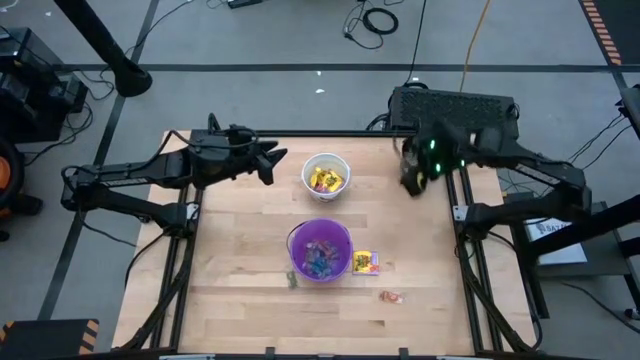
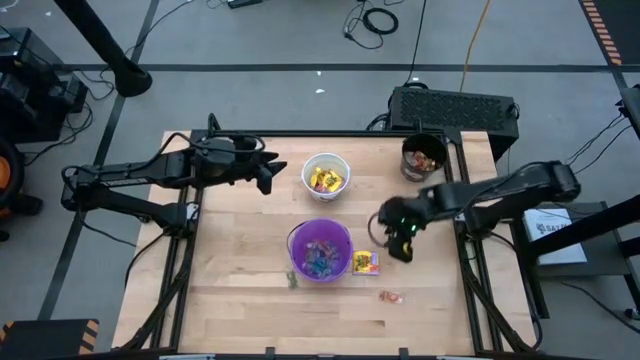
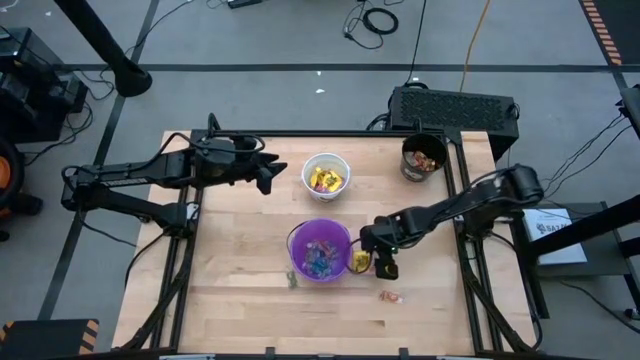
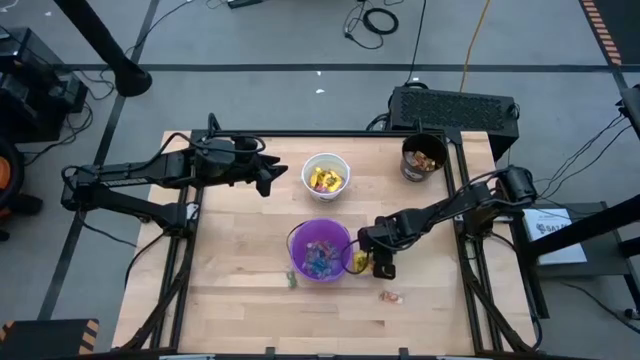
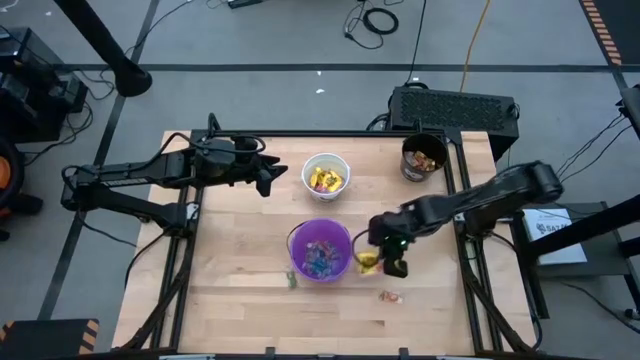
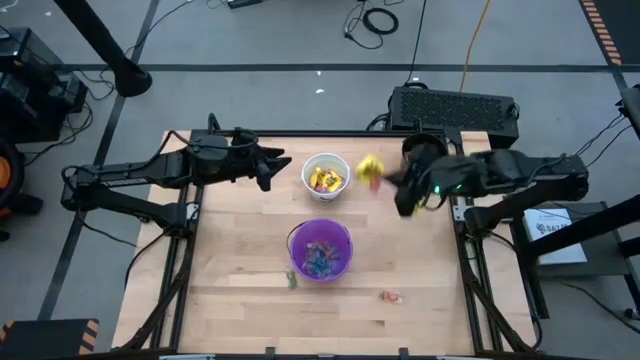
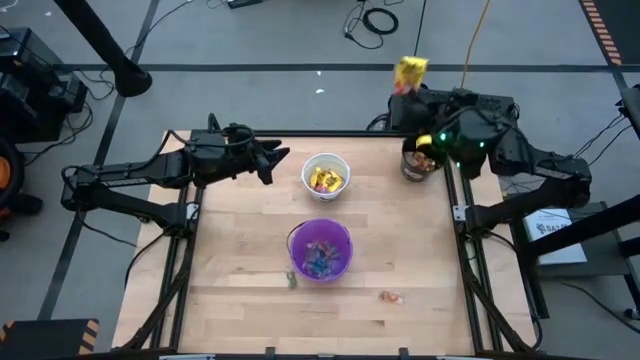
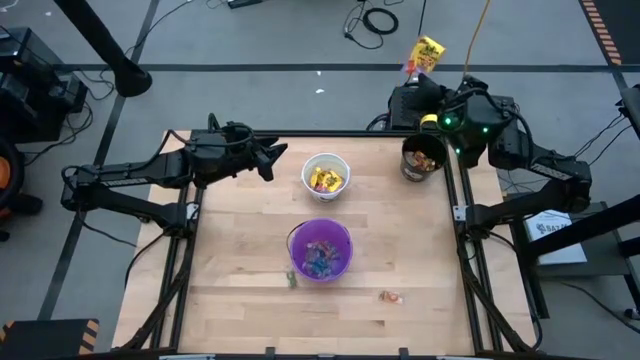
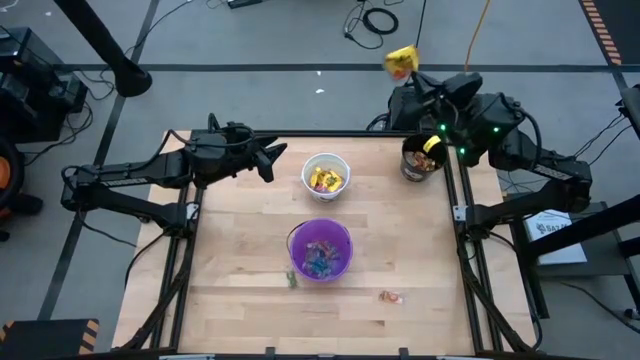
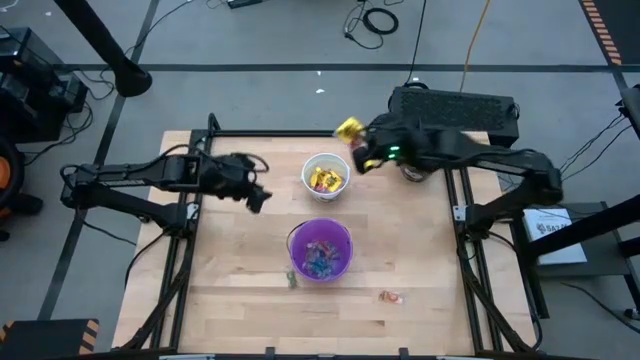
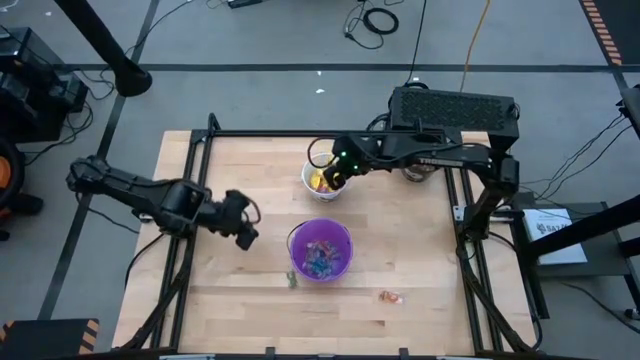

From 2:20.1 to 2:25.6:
Task: Sort candy by brand, put in halloween buckets
Put the yellow candy into the white bucket

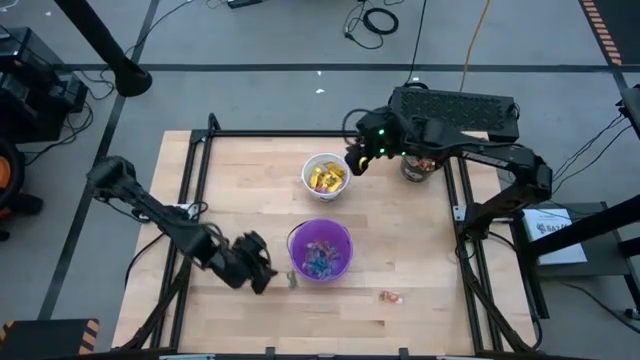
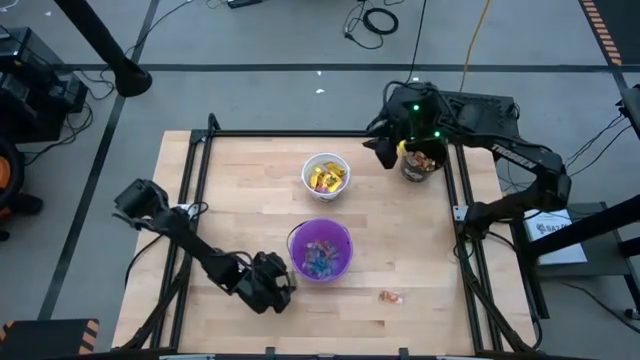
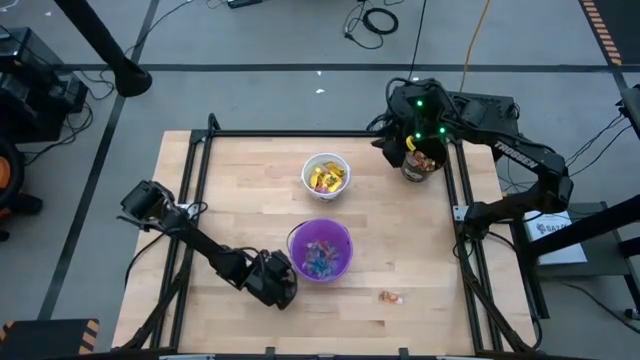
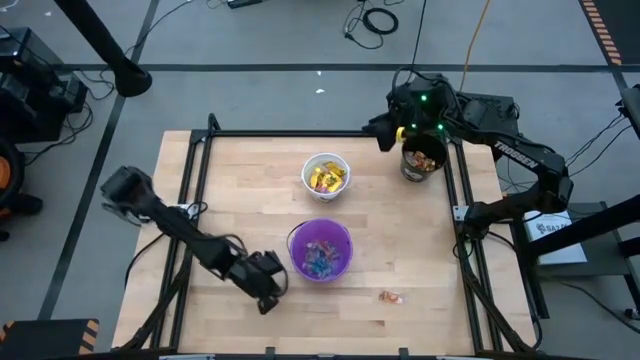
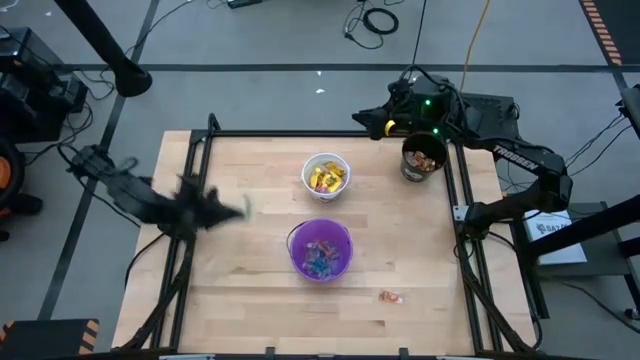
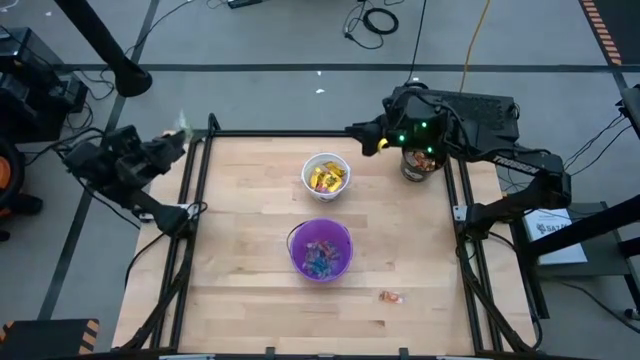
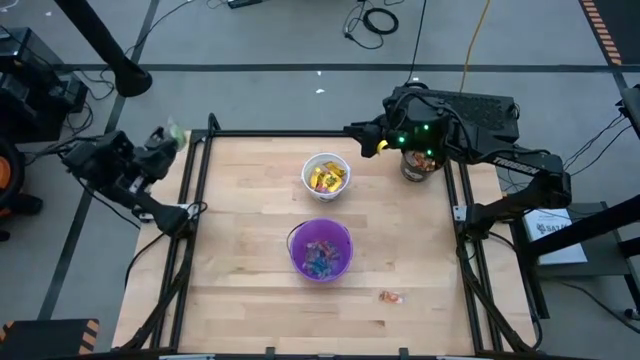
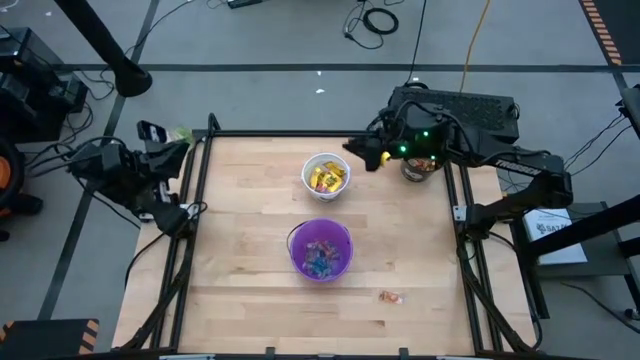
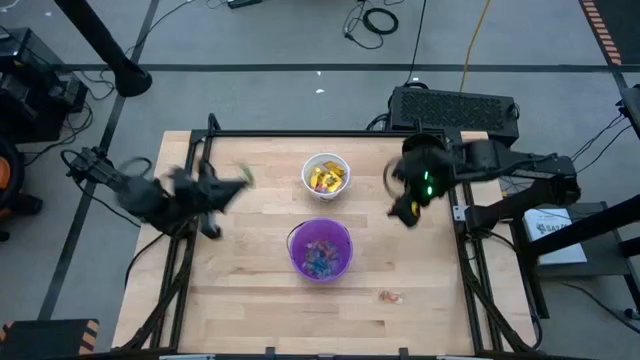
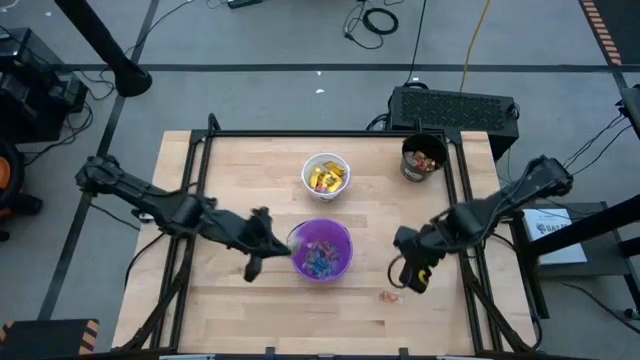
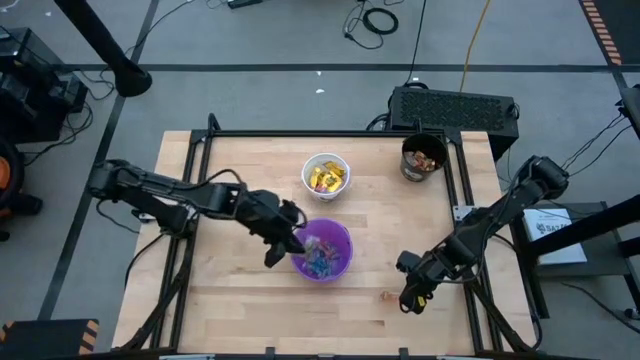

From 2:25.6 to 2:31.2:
Put the green gummy into the violet bucket

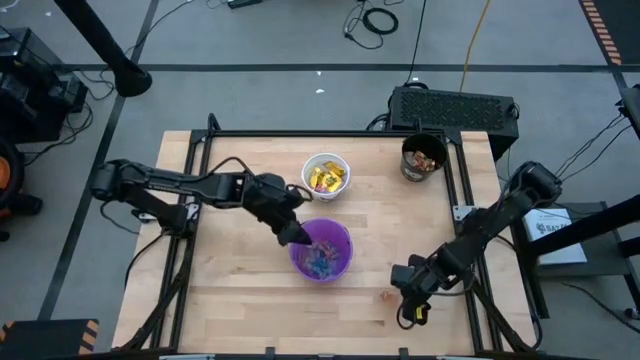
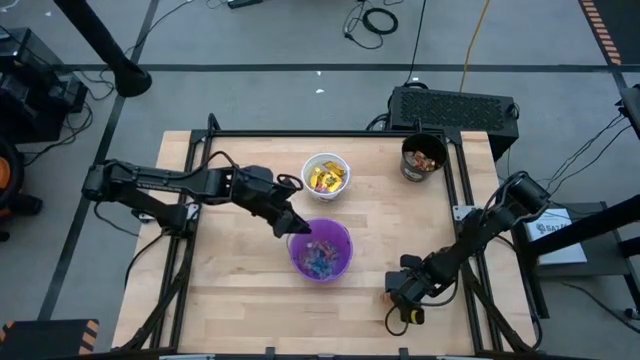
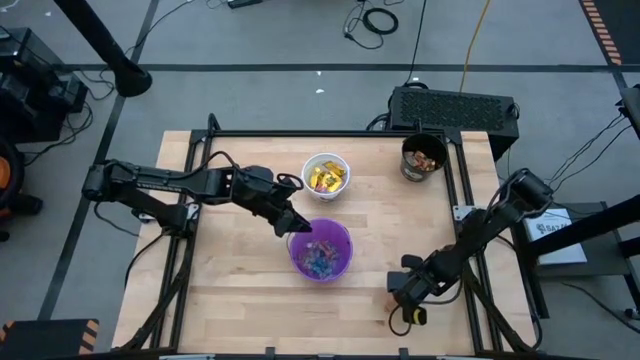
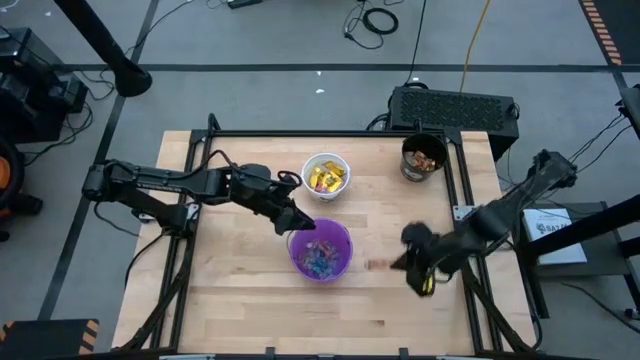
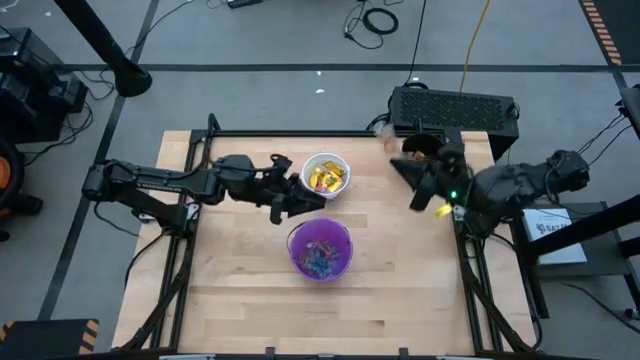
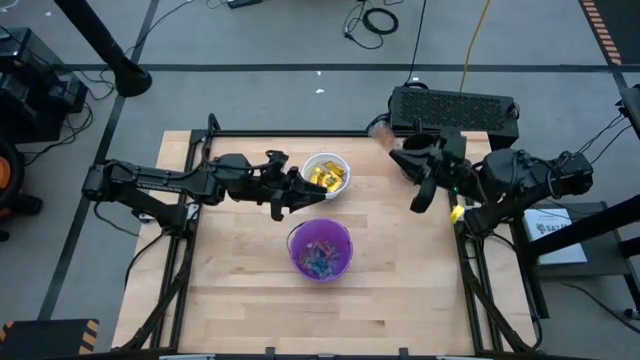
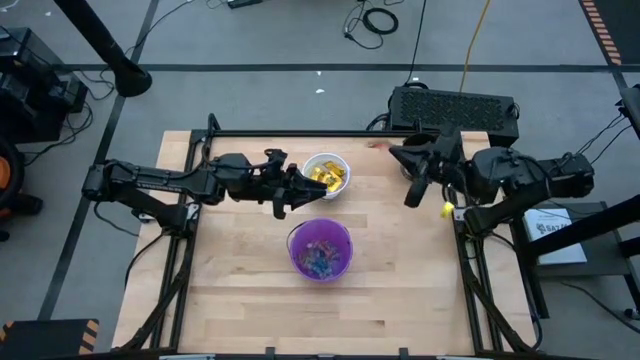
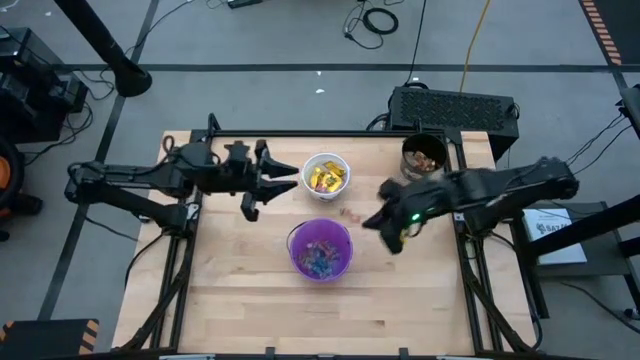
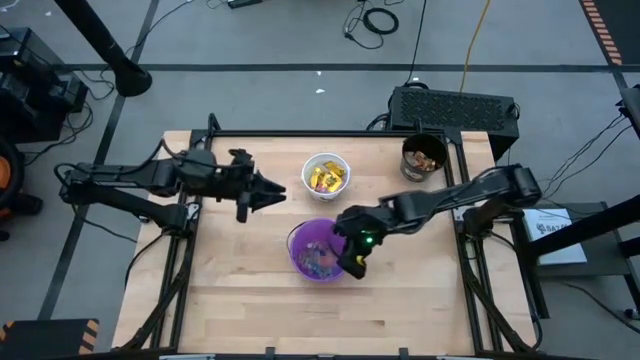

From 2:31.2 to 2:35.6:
Put the orange gummy into the violet bucket

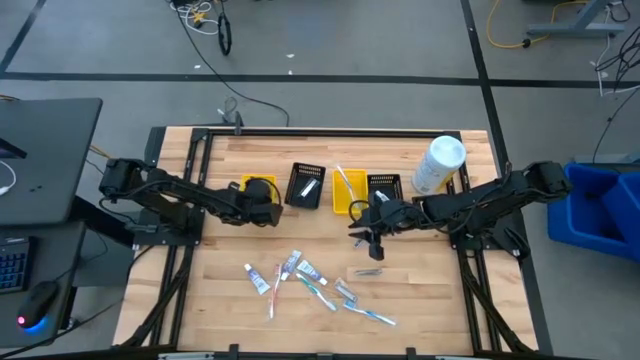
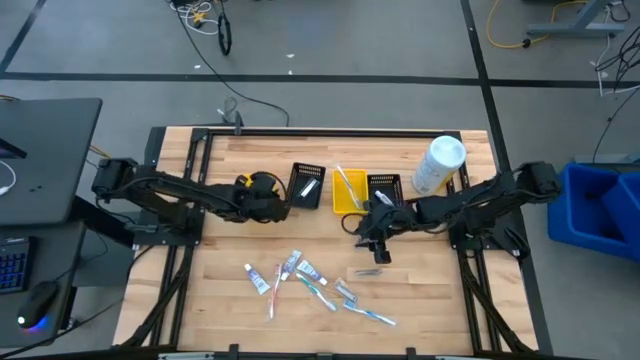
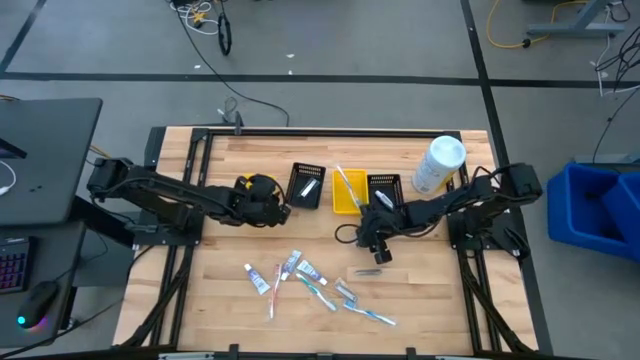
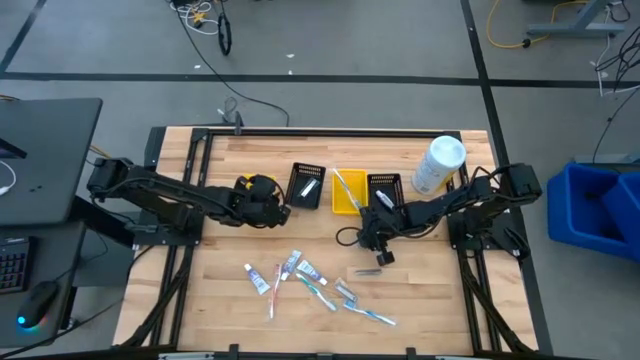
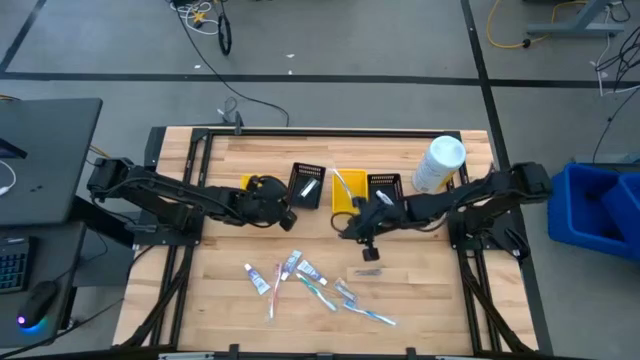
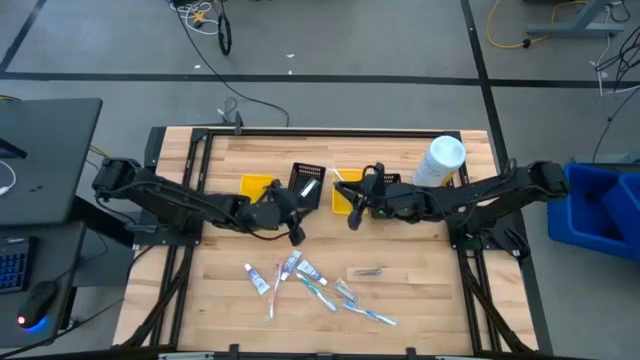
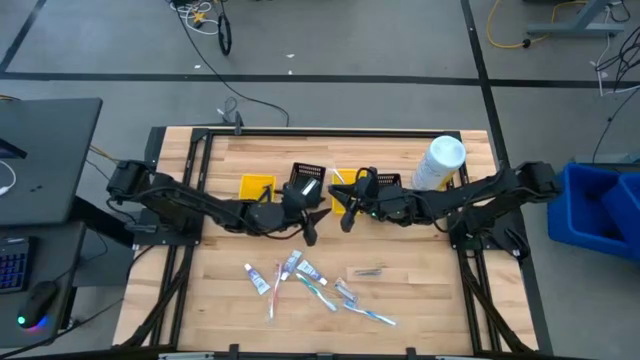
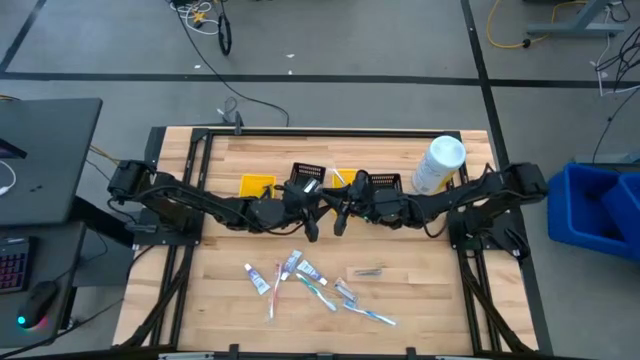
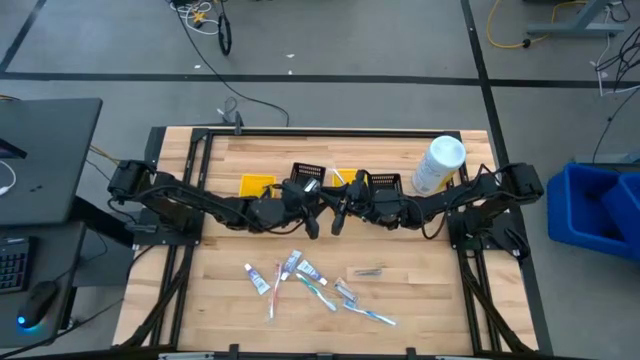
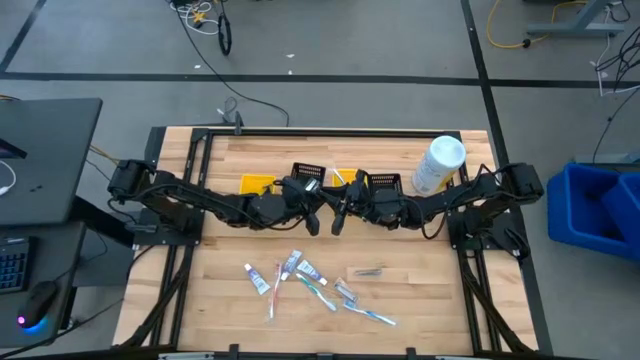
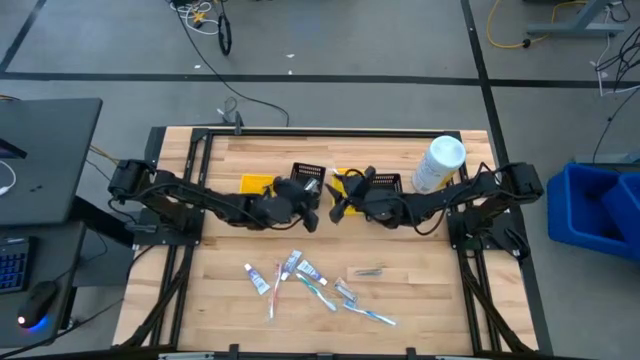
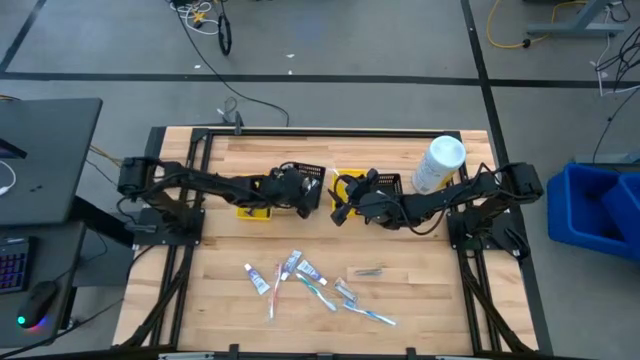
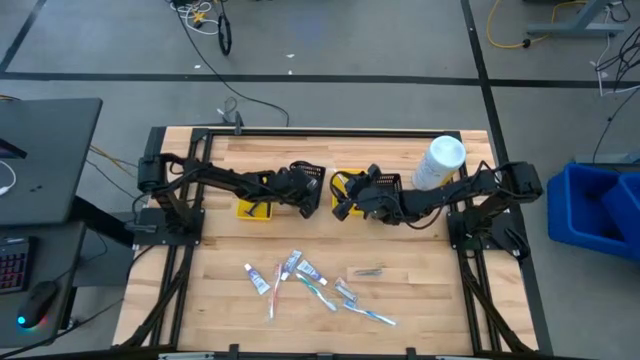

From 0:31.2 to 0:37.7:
Task: Pick & Place Travel size toiletries
Put the silver nail cutter into the left black bin
